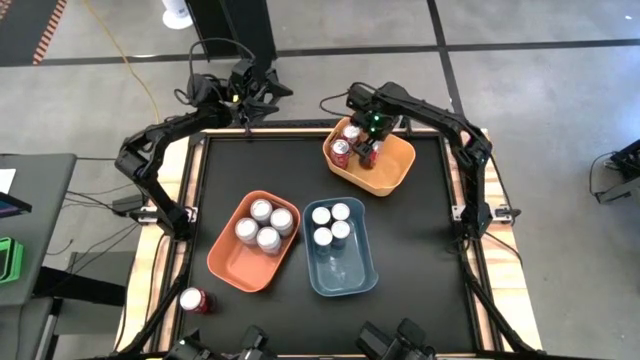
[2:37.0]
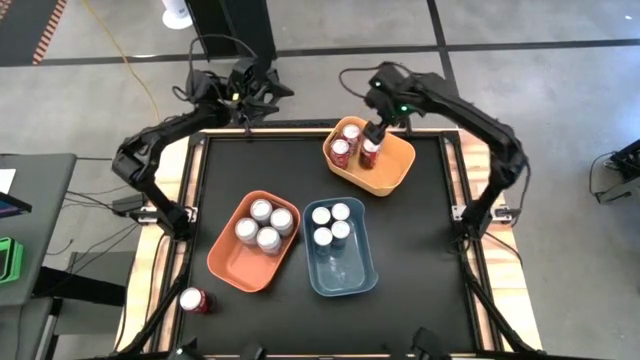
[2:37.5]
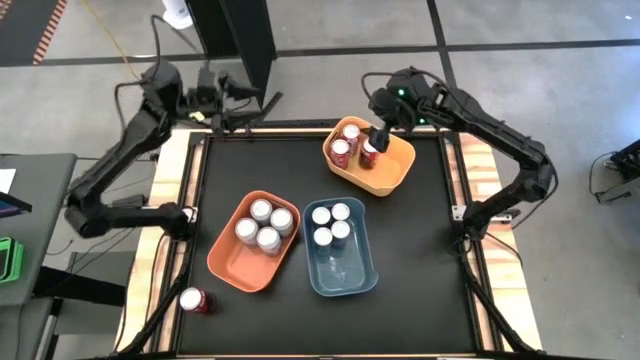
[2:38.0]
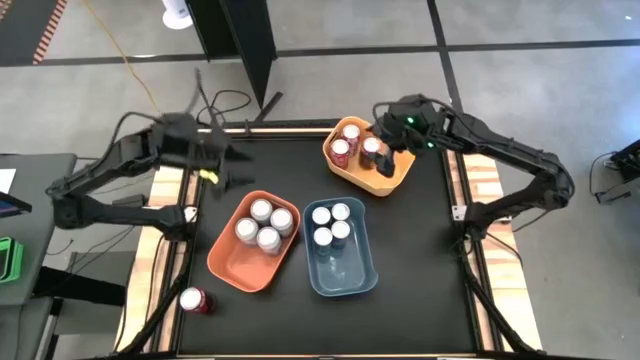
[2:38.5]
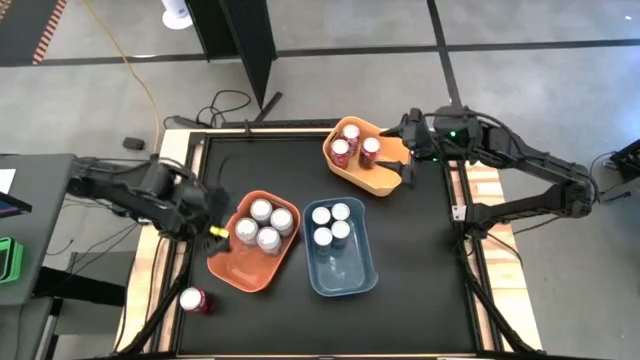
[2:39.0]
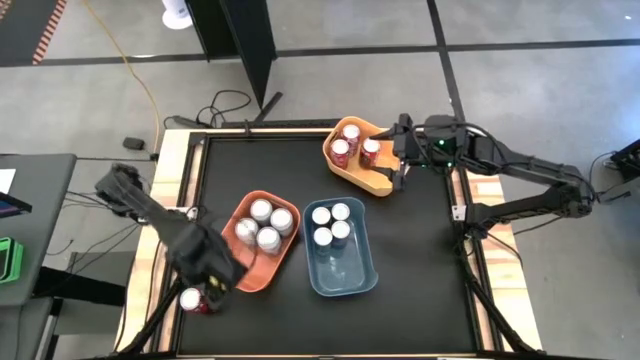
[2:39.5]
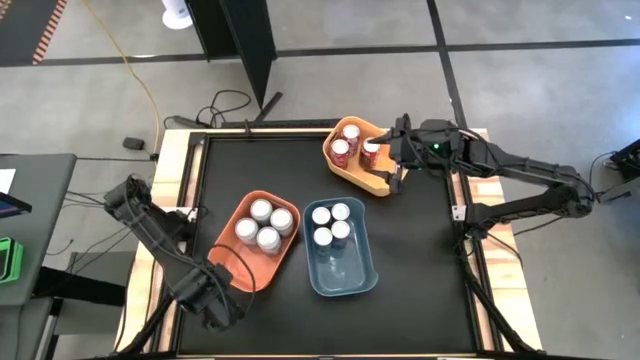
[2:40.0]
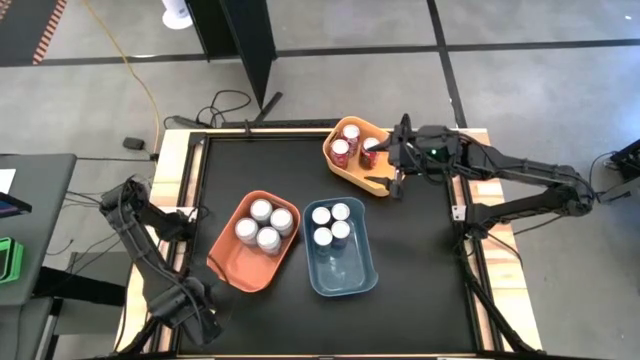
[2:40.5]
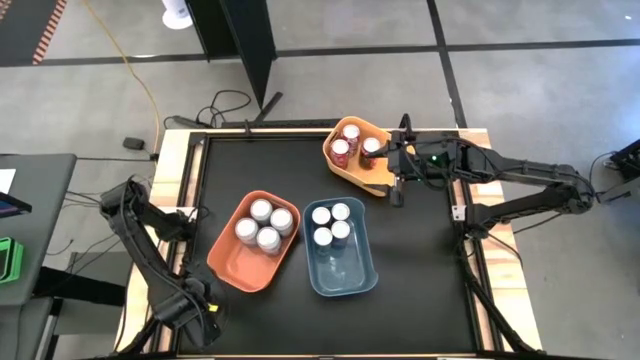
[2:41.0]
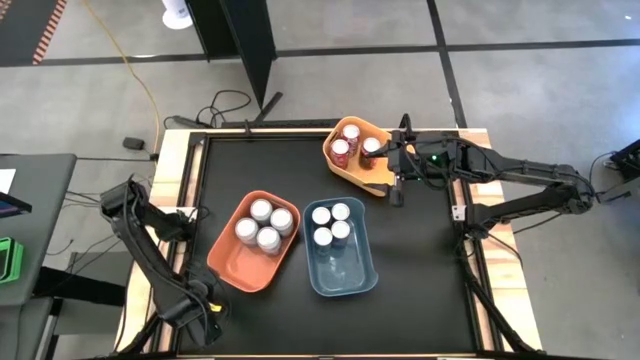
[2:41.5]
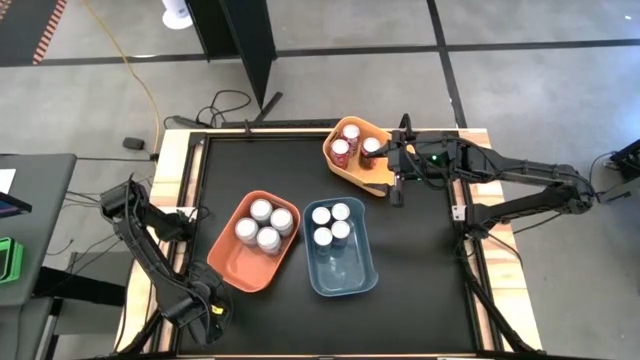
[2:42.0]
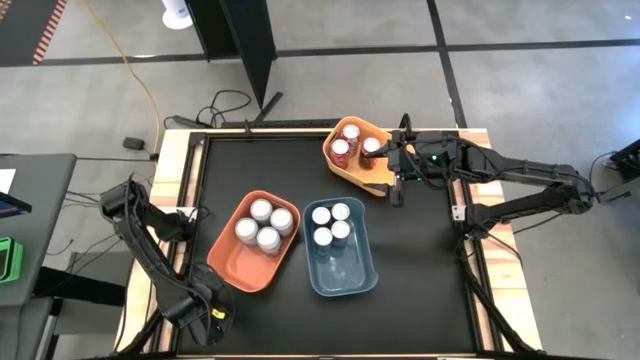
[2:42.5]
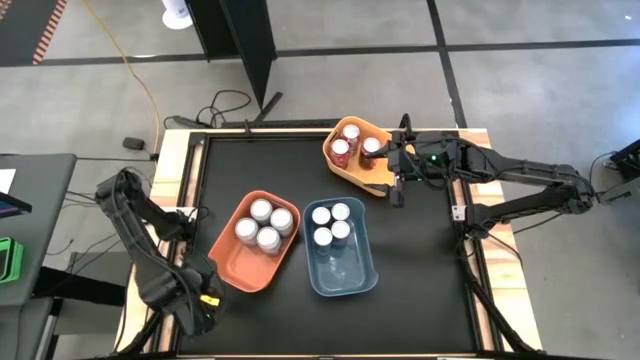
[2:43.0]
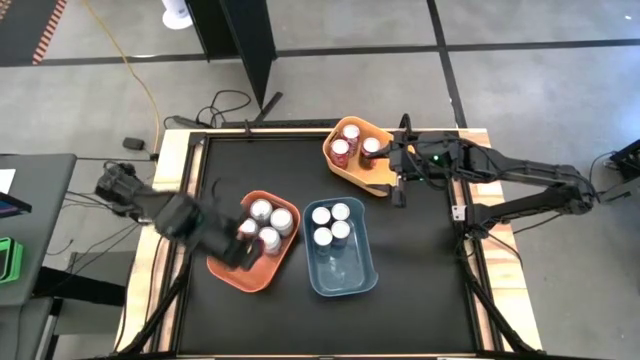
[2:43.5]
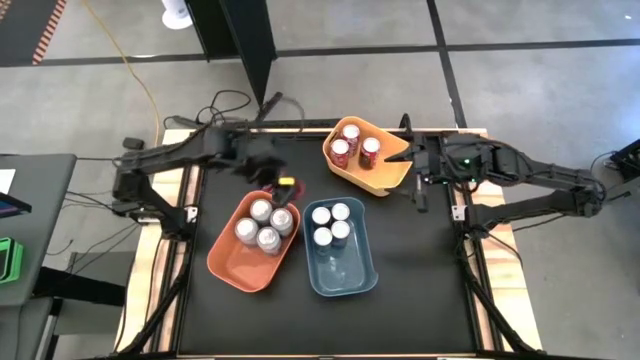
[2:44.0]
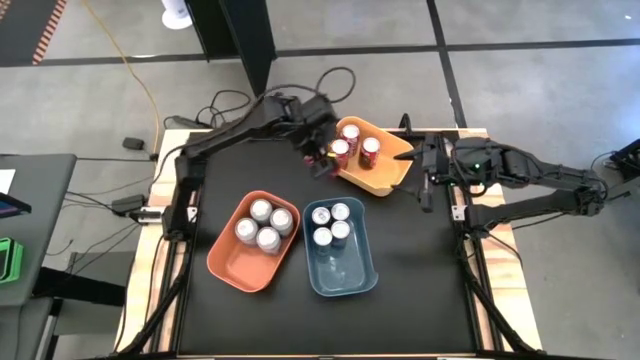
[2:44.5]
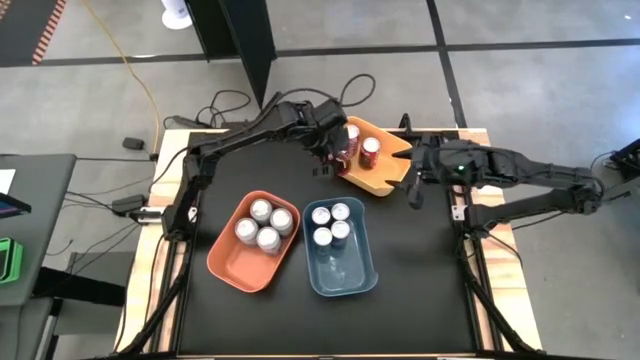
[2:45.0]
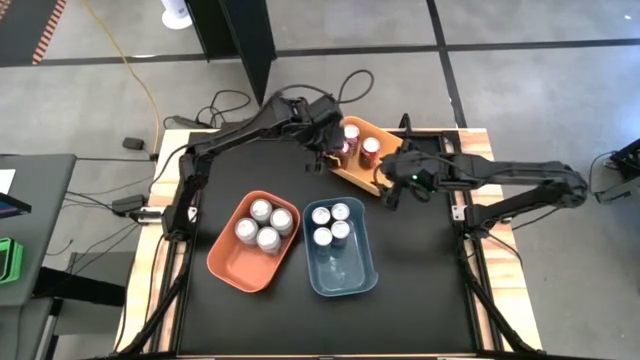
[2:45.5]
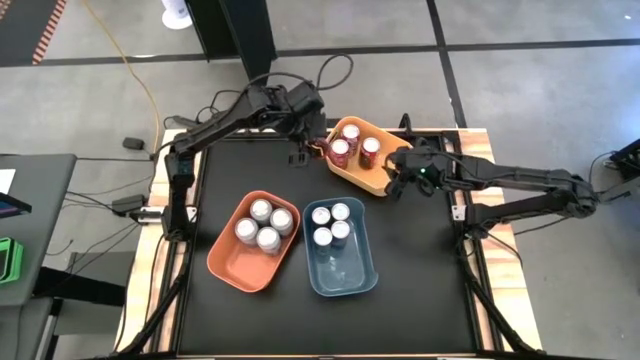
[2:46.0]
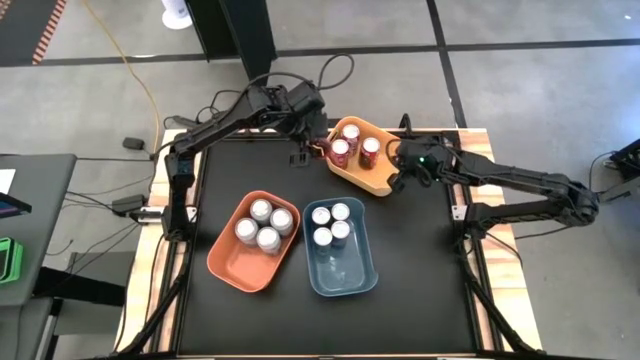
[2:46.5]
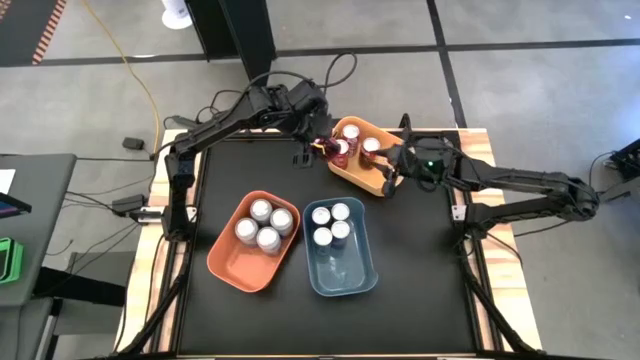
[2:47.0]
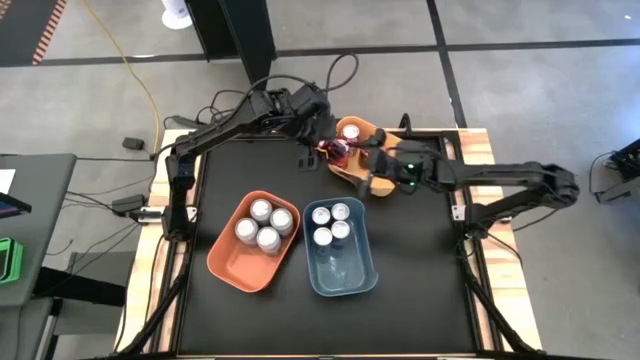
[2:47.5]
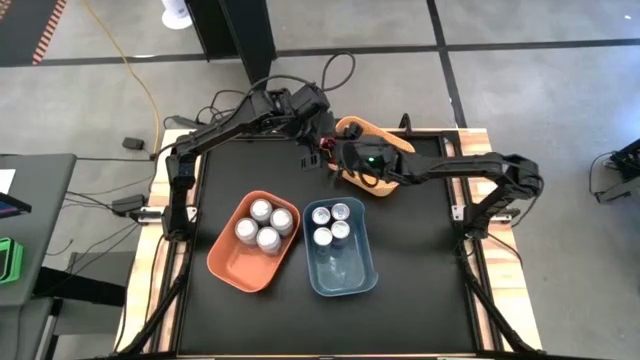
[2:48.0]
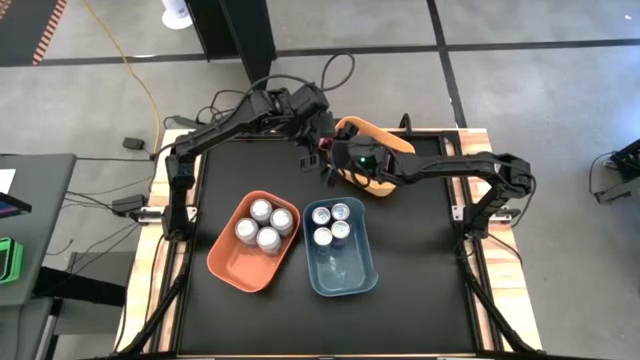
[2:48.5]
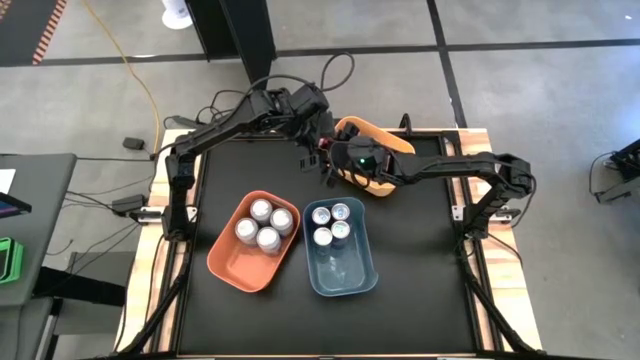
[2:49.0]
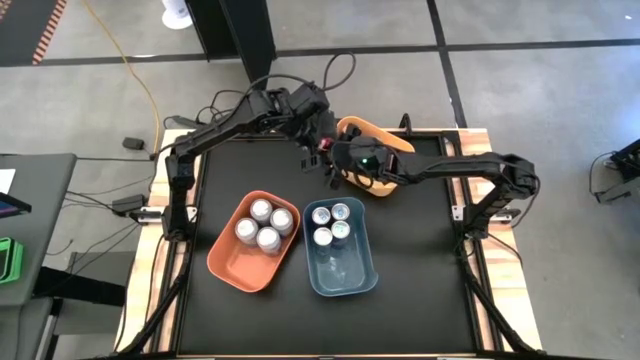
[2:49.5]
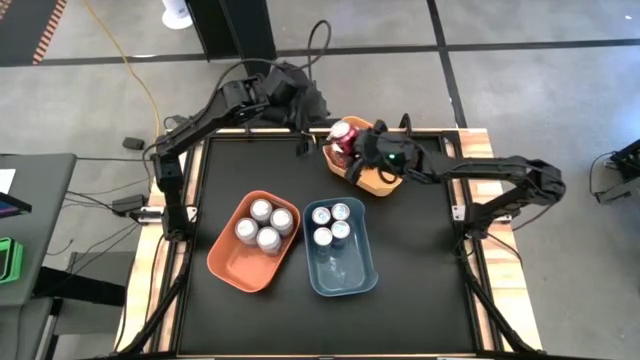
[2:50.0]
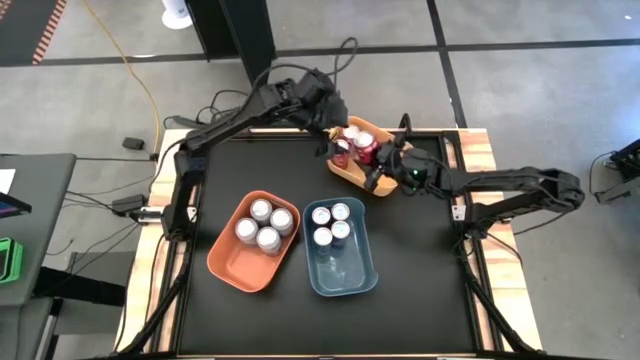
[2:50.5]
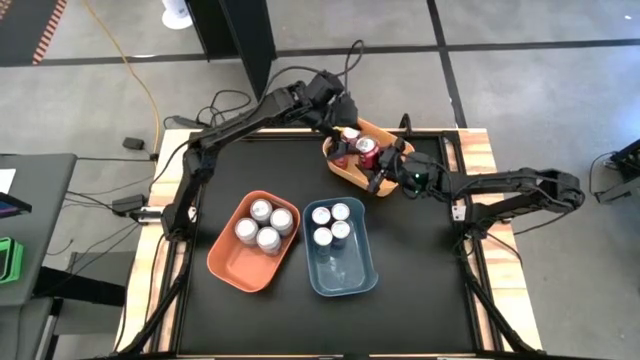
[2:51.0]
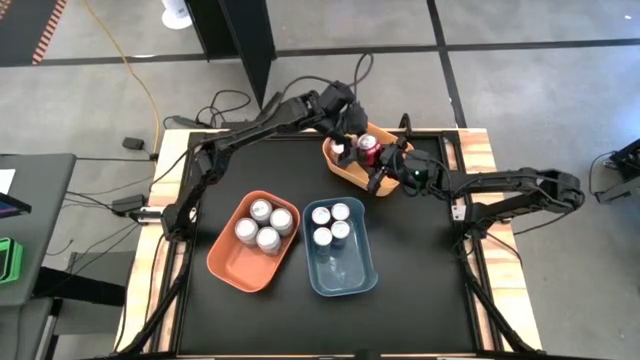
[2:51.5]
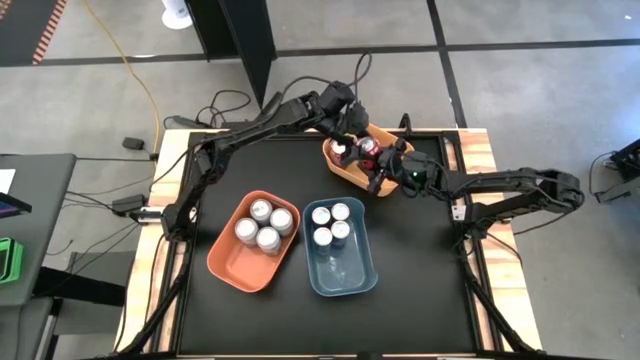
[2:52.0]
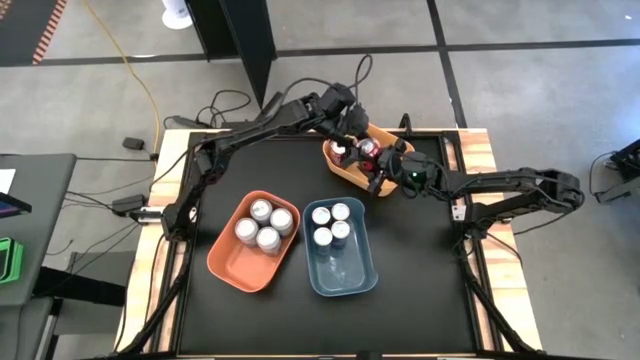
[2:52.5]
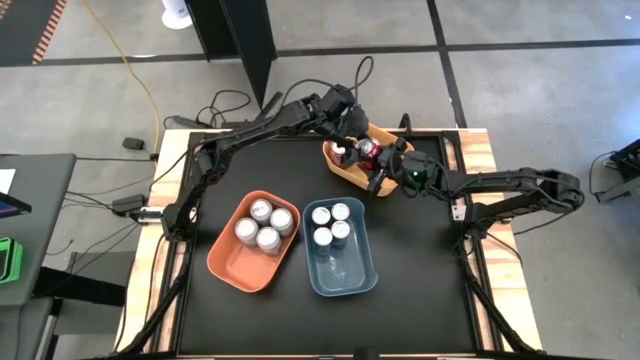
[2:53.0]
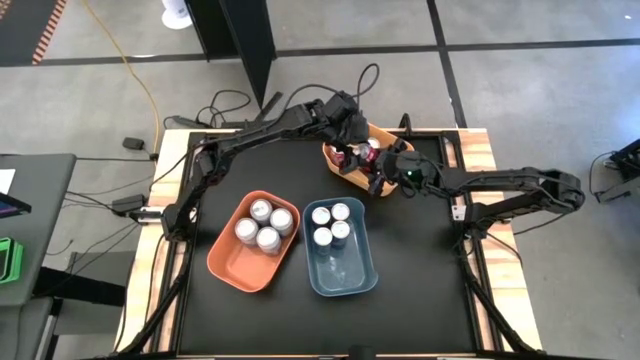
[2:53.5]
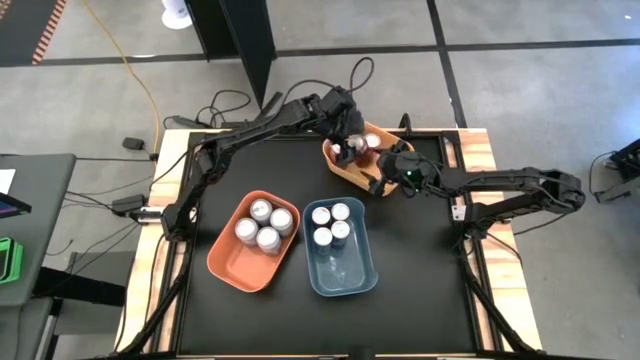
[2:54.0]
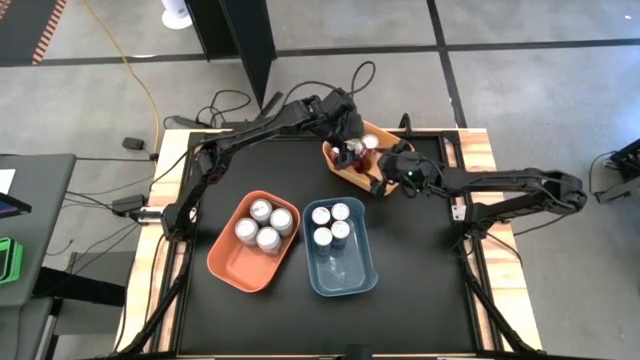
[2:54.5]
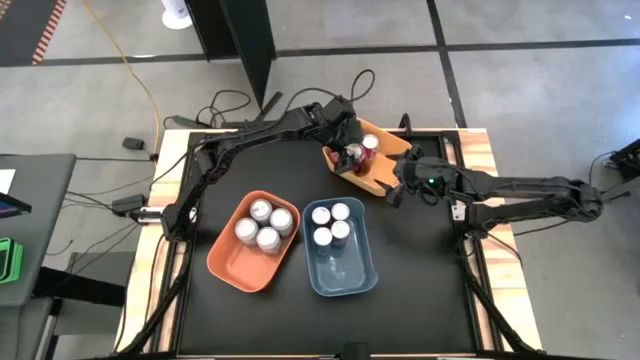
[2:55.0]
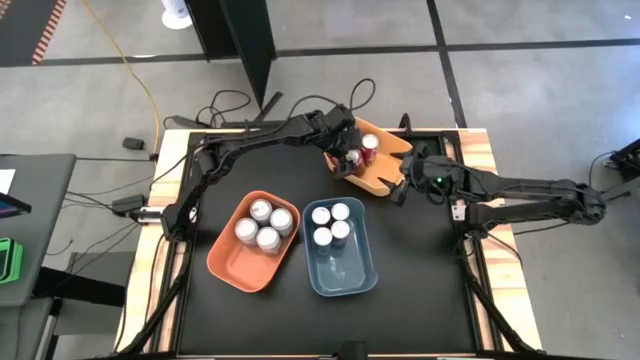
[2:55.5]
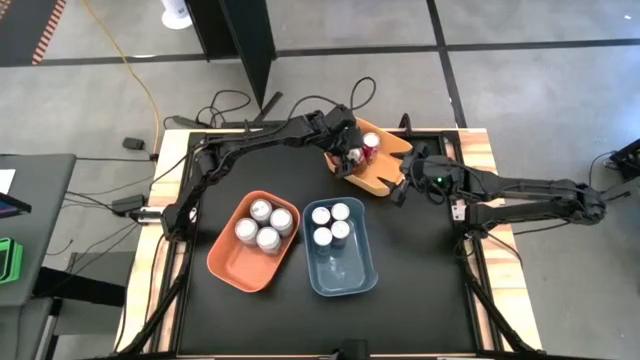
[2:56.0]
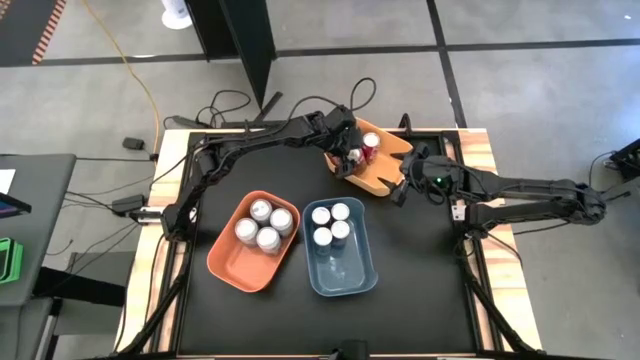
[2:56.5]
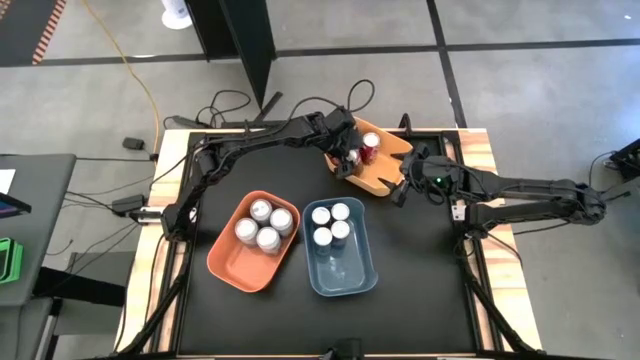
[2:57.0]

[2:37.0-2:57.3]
Task: Sort soda cans
Put the red soda can into the yellow bin
